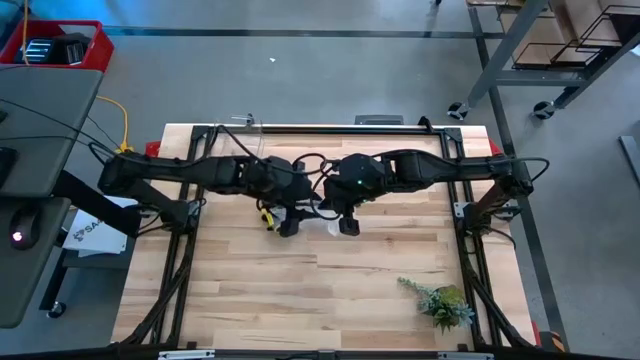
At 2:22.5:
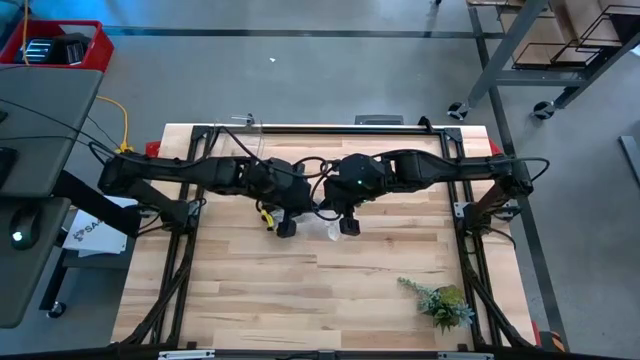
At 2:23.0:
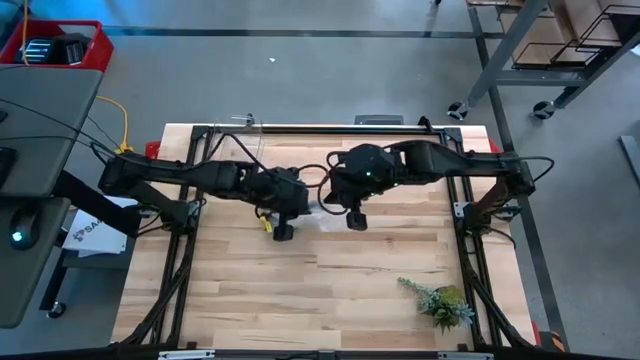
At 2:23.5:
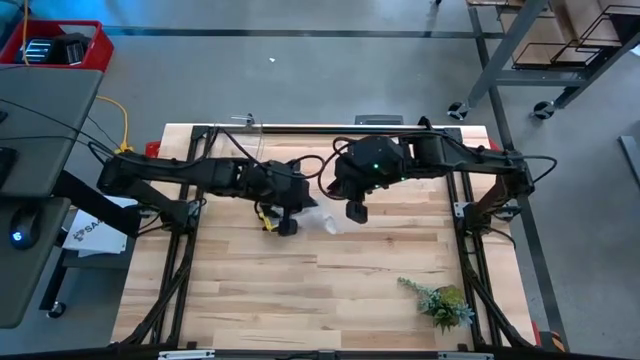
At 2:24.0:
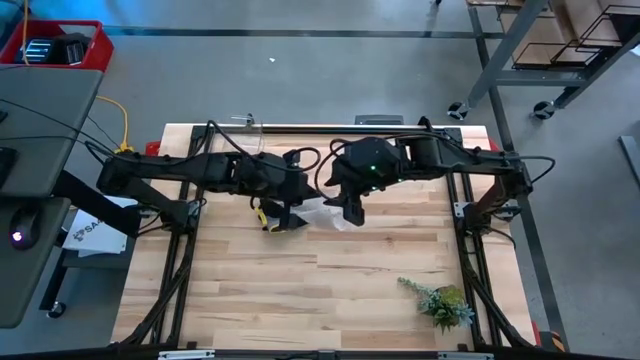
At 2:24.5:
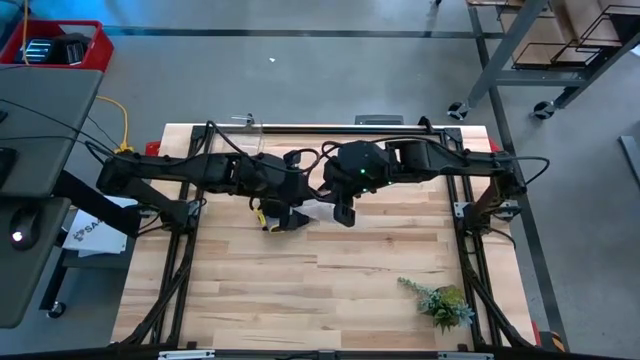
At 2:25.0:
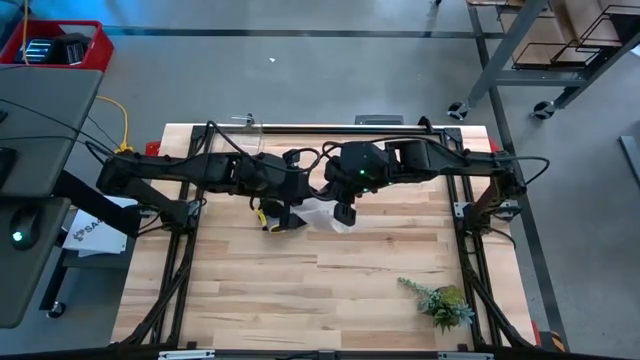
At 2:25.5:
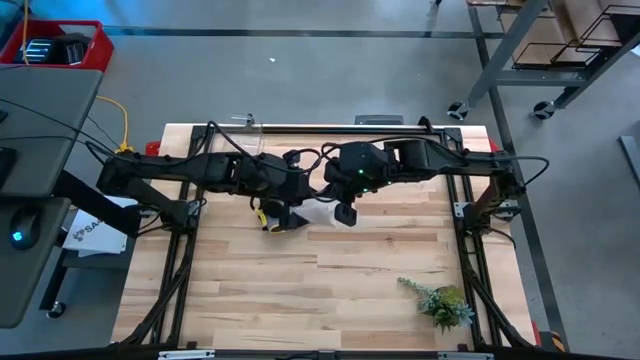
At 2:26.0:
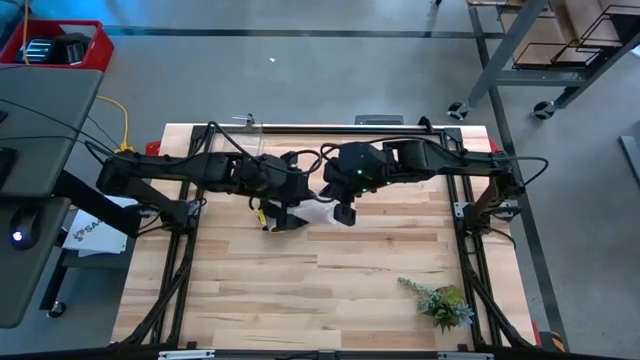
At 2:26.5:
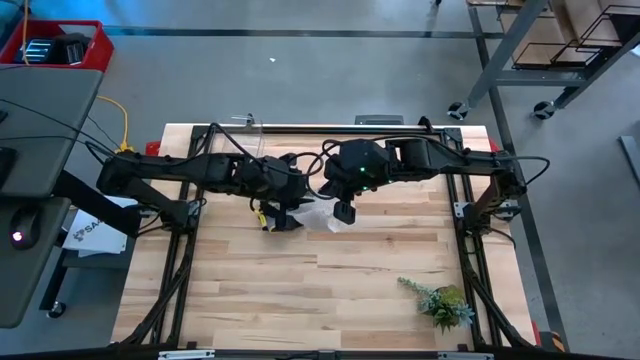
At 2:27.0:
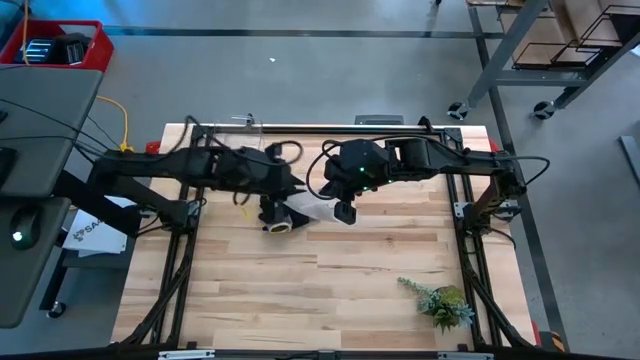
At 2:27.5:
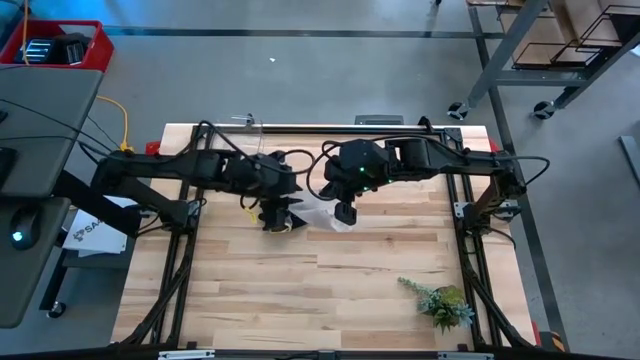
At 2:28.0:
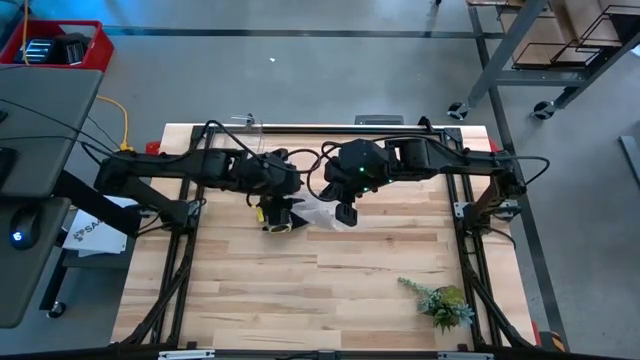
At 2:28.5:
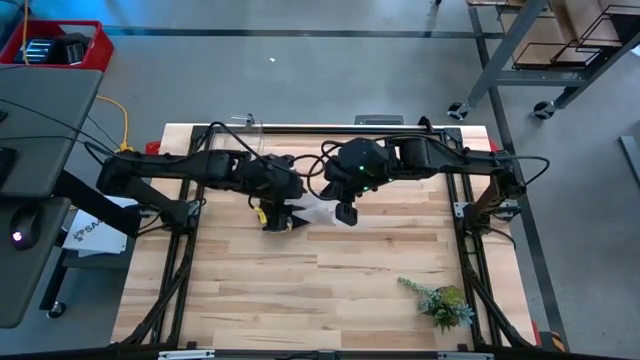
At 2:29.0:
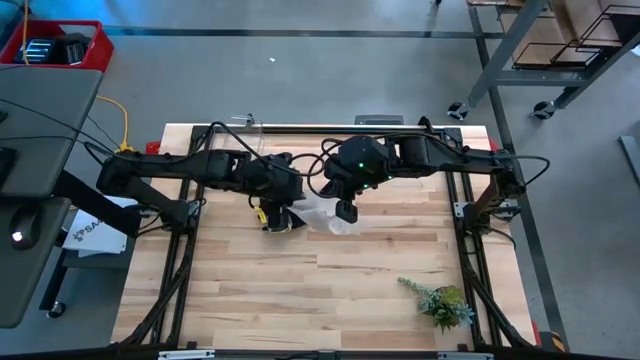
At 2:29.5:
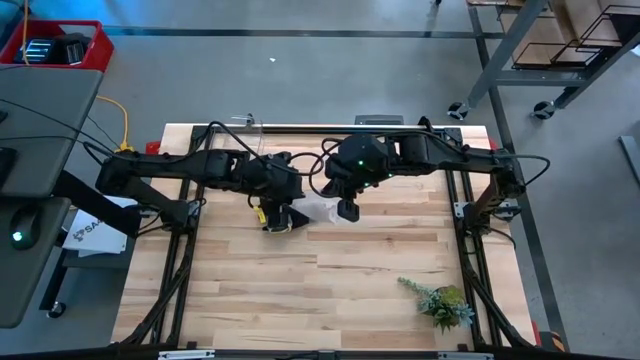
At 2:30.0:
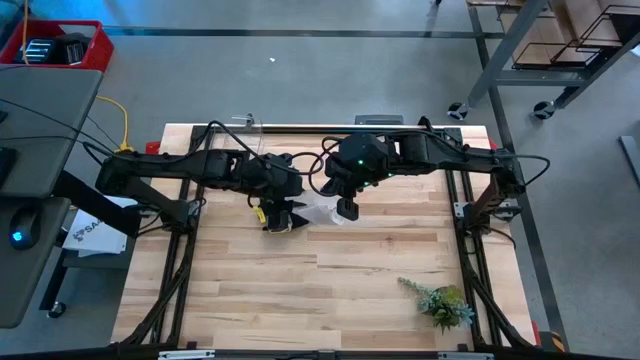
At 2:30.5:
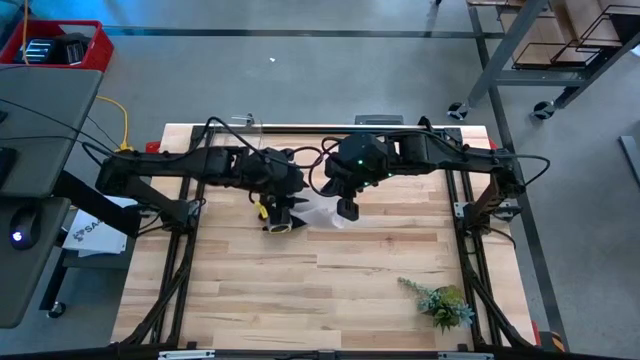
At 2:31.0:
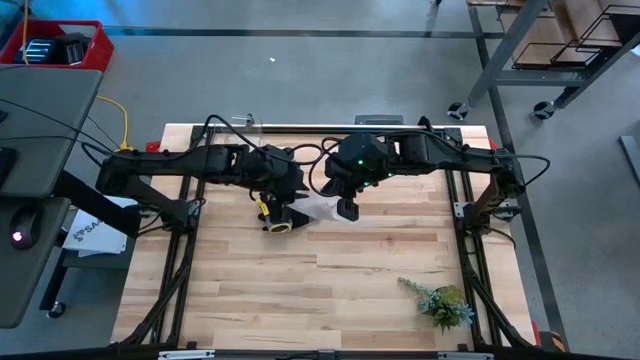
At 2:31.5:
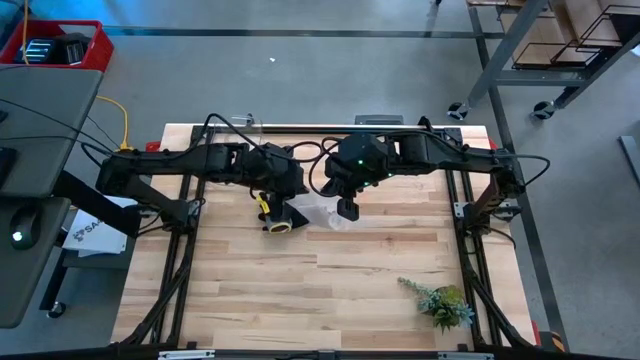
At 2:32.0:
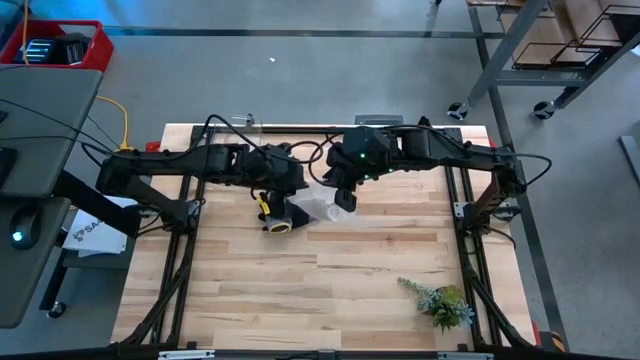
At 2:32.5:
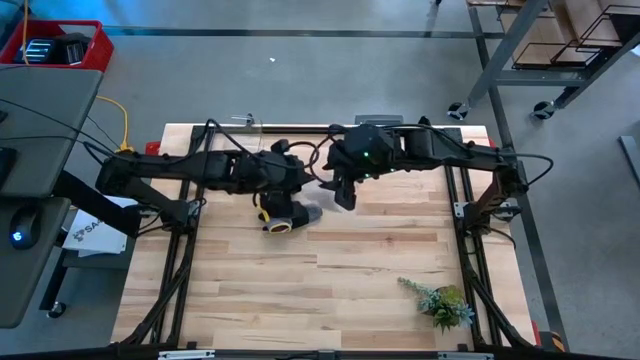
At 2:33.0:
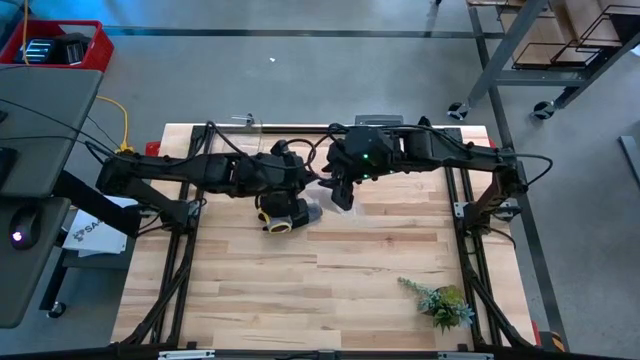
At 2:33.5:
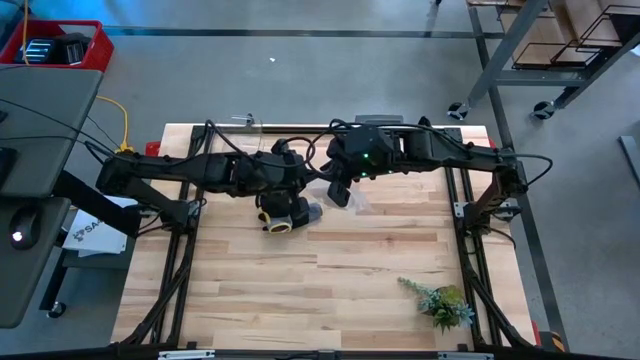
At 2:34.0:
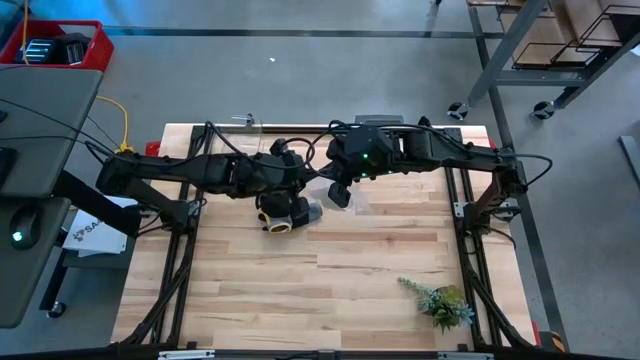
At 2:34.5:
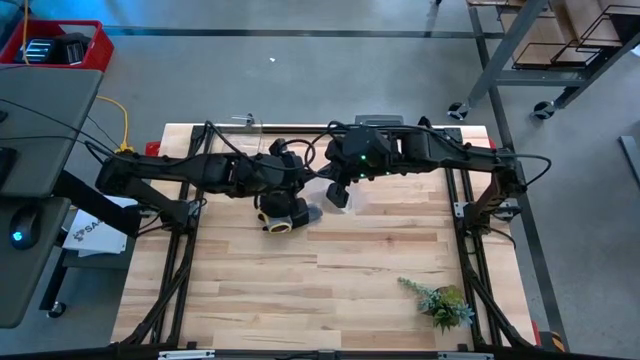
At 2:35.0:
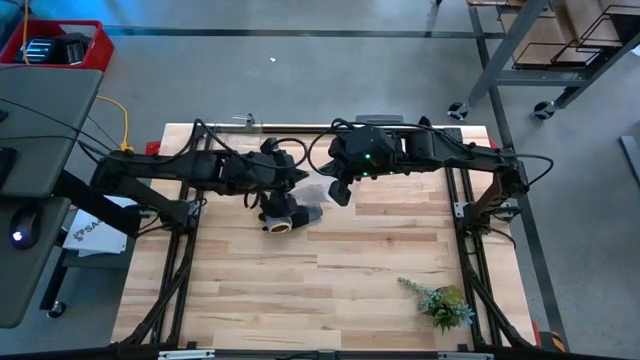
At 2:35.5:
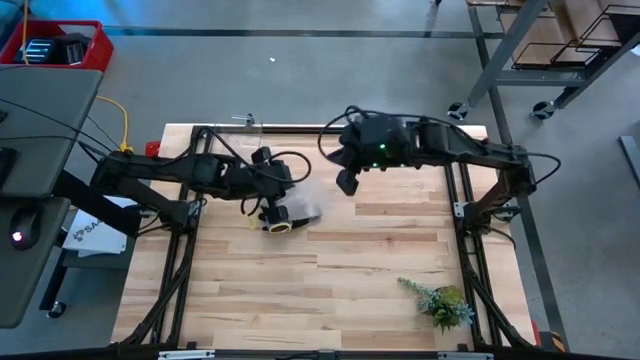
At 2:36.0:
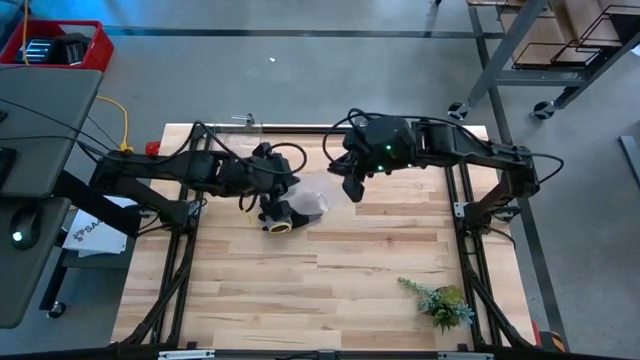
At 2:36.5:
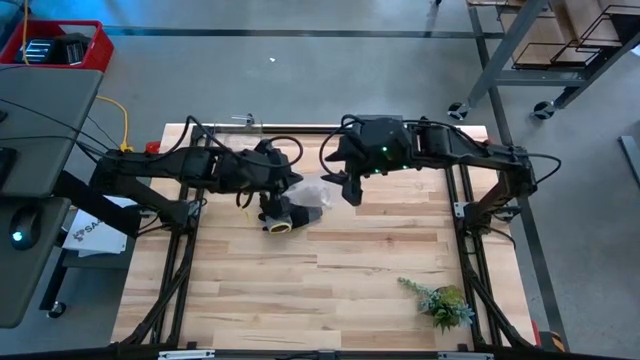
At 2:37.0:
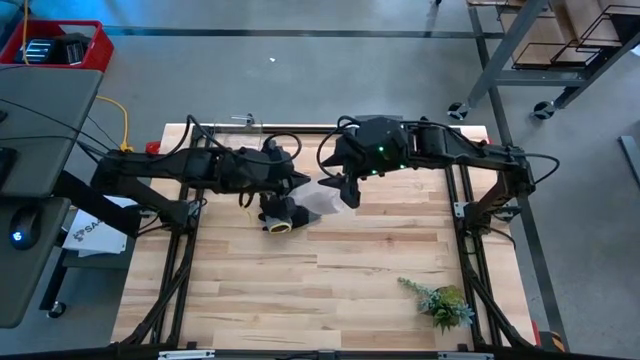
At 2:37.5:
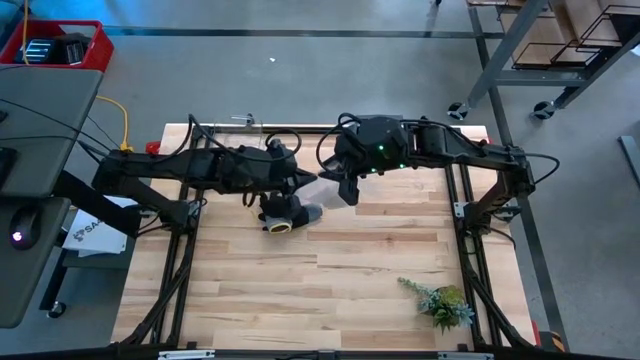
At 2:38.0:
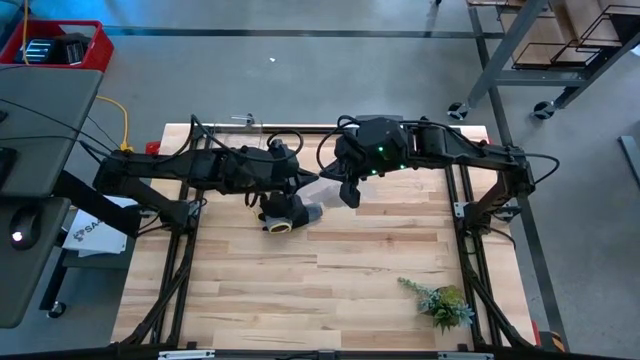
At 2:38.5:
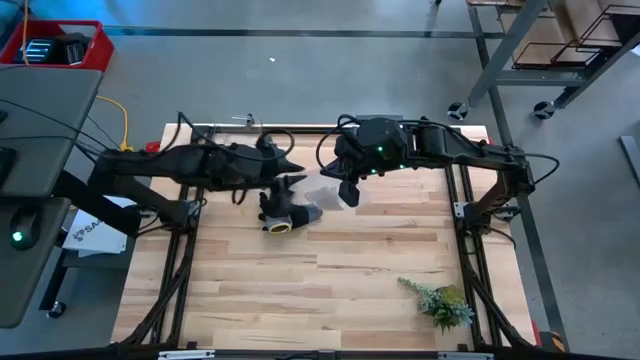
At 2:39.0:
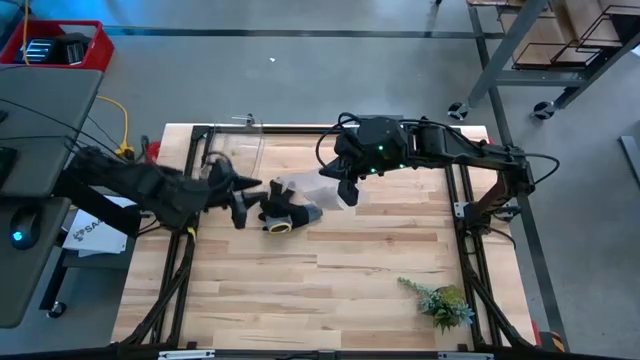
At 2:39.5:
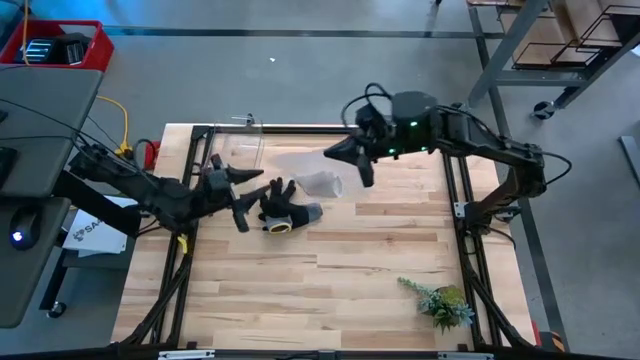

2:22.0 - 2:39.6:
Task: Roll bandage
Close the transparent zip bag

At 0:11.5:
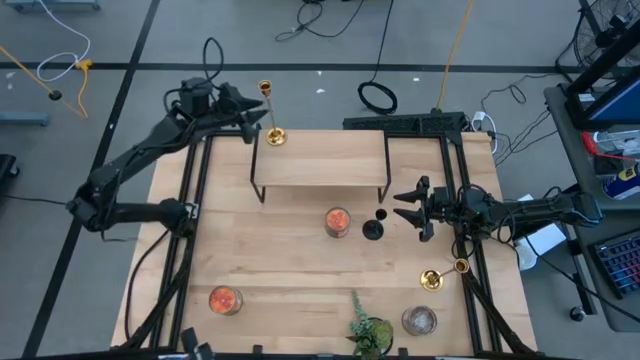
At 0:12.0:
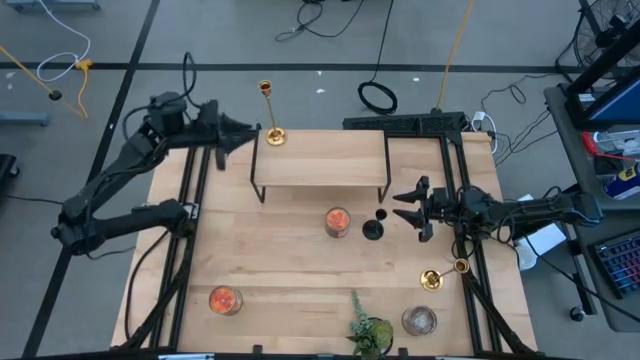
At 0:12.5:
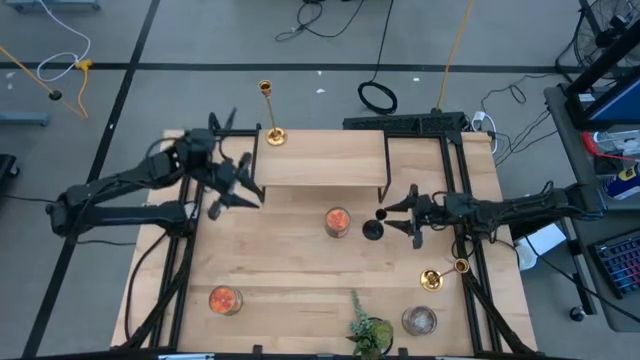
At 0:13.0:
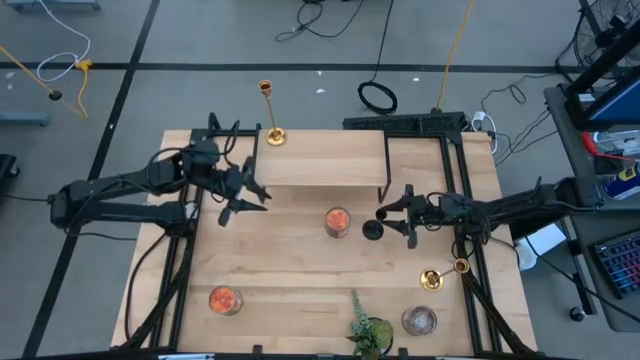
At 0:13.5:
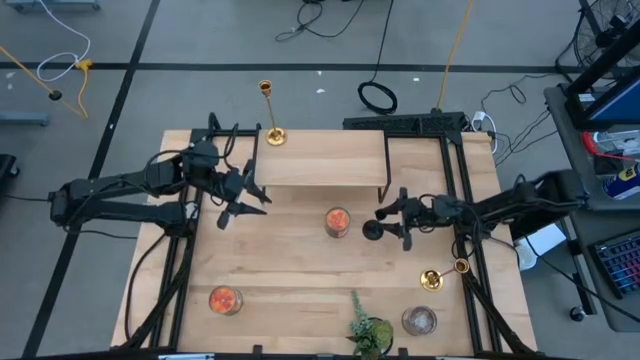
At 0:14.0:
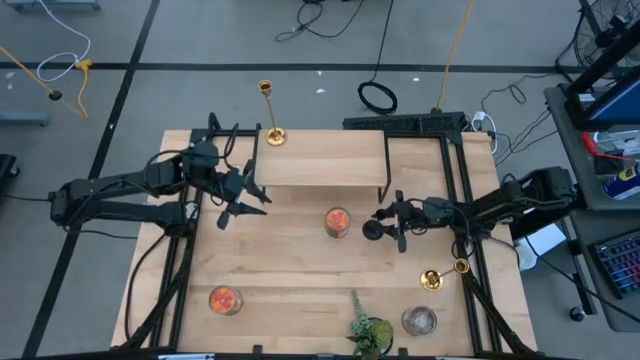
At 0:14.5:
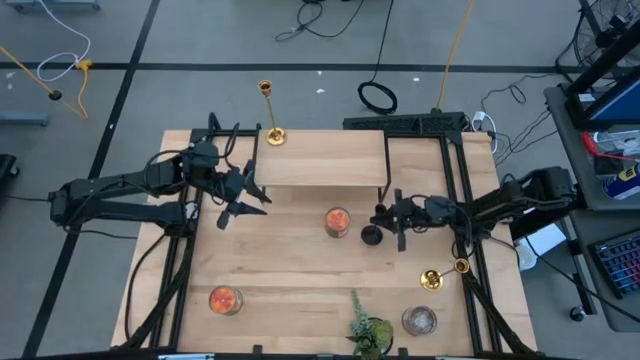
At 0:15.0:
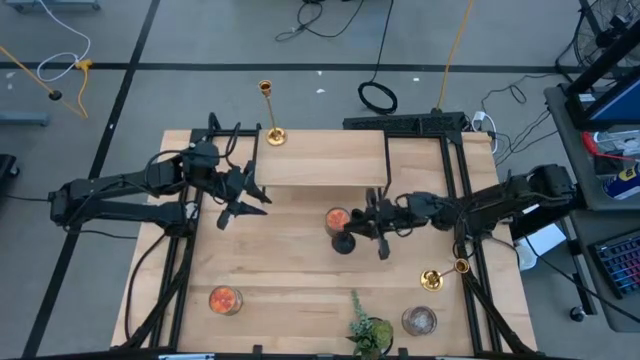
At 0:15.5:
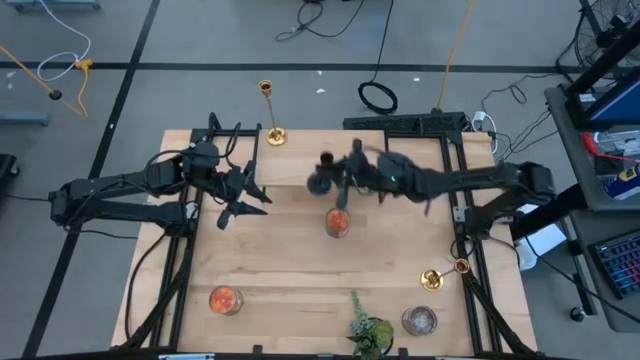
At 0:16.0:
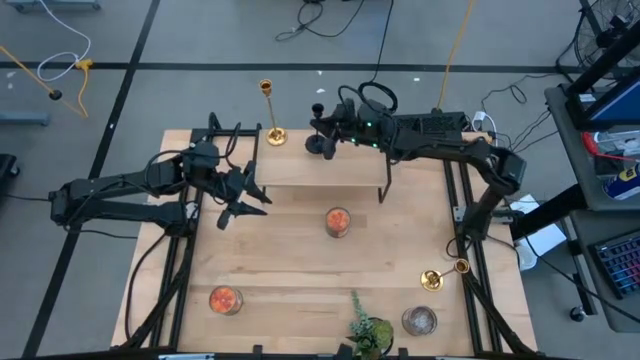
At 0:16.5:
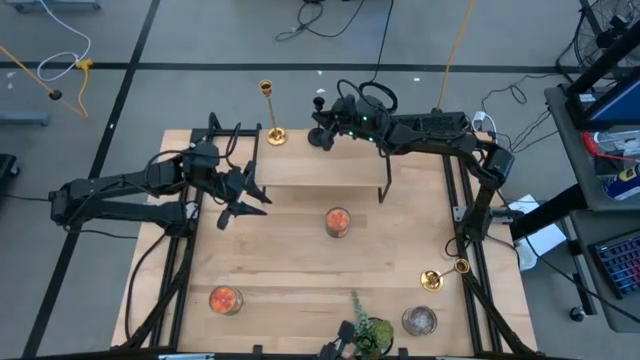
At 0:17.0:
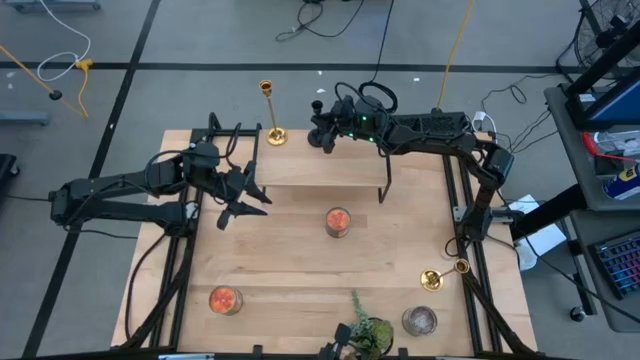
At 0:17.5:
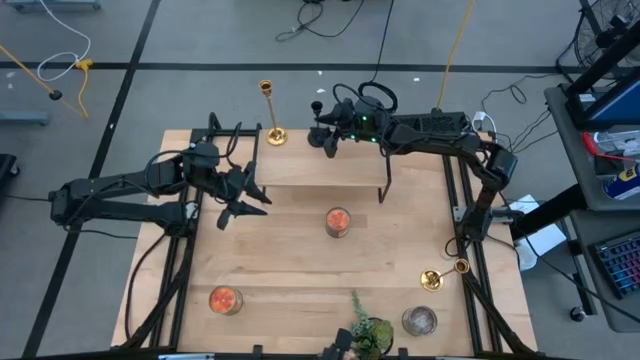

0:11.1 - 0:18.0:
Task: Pick & Place candle stick holders
Put the black candle holder on the shelf aligned with the other gold candle holder
